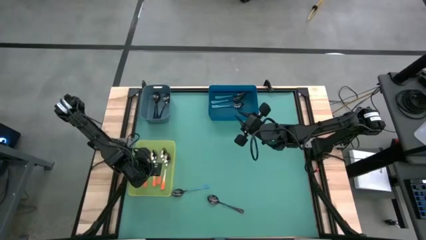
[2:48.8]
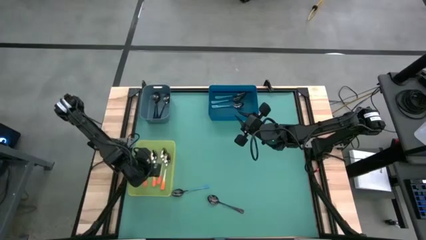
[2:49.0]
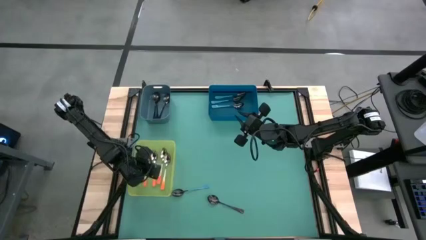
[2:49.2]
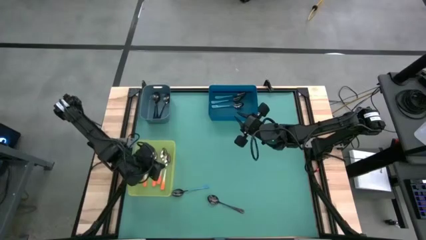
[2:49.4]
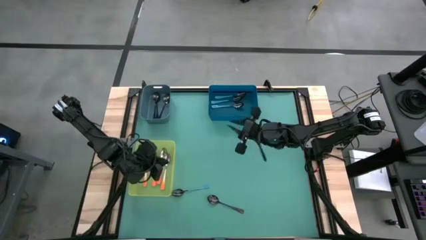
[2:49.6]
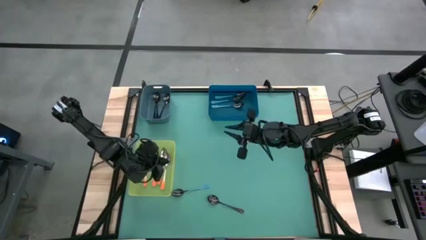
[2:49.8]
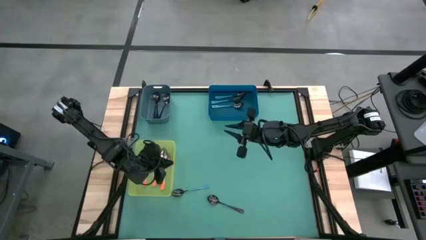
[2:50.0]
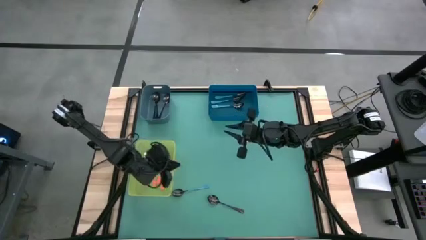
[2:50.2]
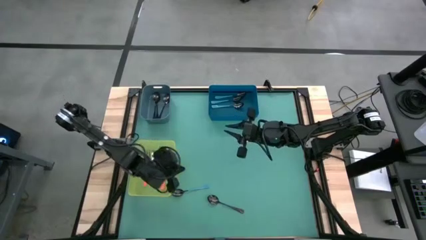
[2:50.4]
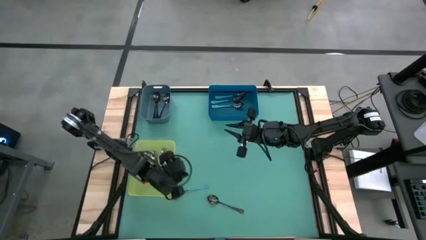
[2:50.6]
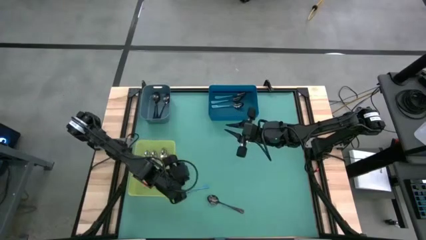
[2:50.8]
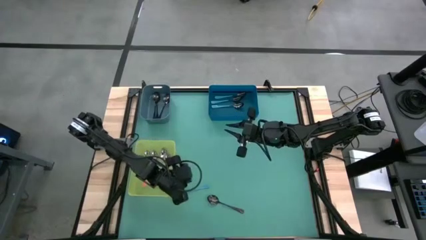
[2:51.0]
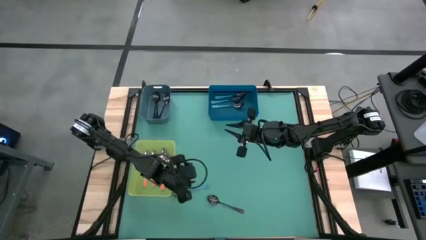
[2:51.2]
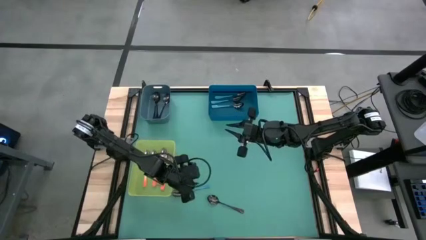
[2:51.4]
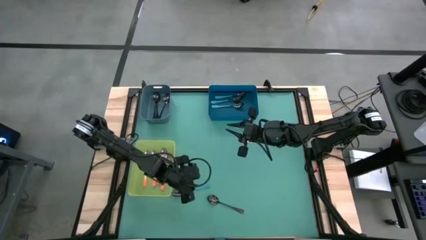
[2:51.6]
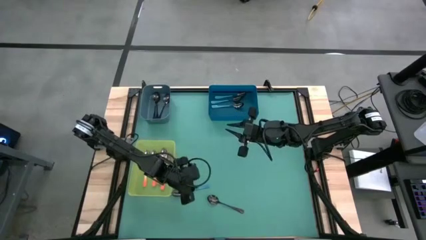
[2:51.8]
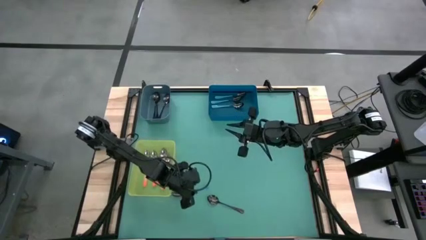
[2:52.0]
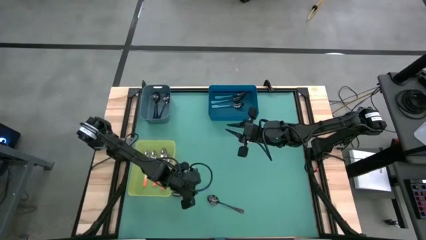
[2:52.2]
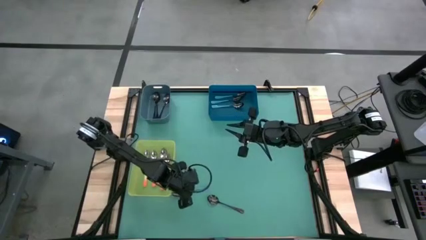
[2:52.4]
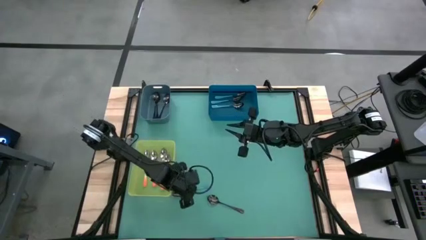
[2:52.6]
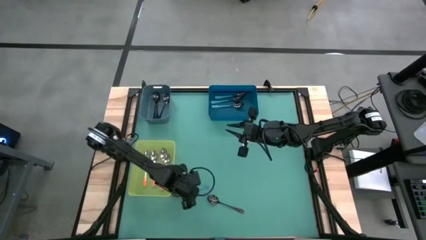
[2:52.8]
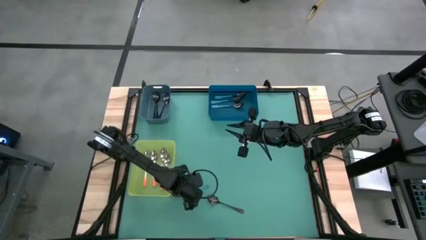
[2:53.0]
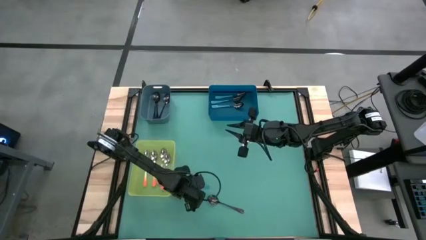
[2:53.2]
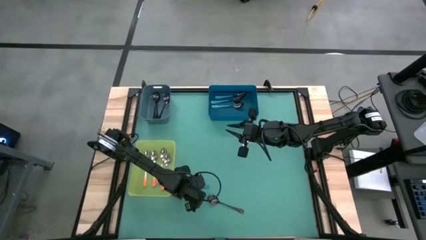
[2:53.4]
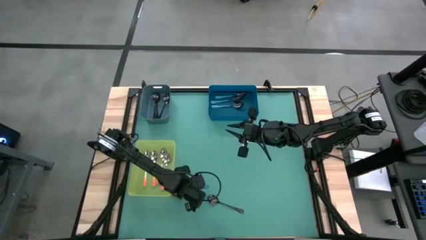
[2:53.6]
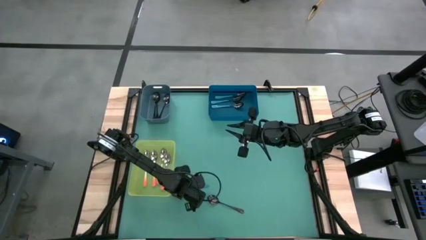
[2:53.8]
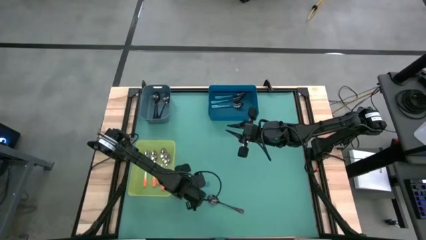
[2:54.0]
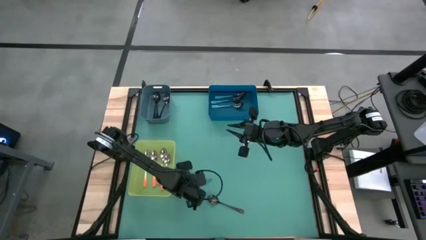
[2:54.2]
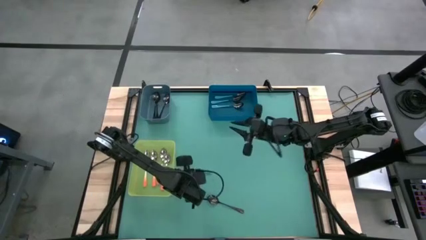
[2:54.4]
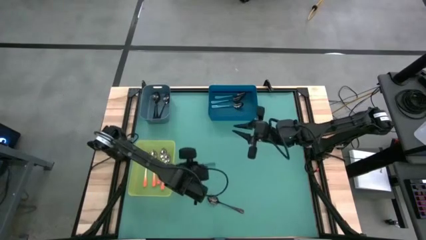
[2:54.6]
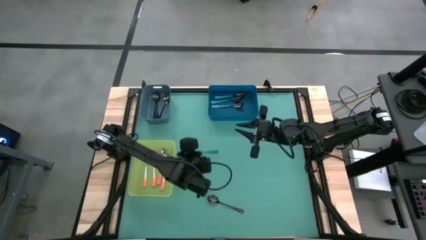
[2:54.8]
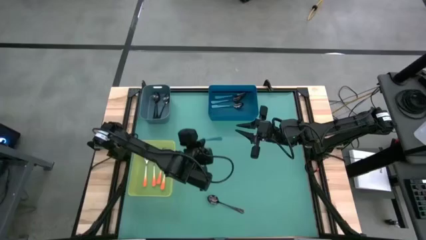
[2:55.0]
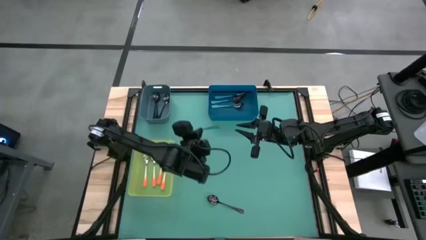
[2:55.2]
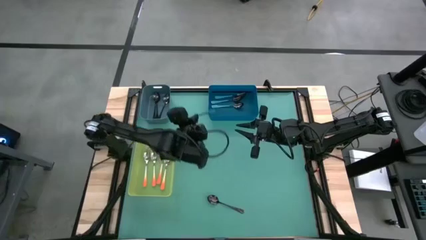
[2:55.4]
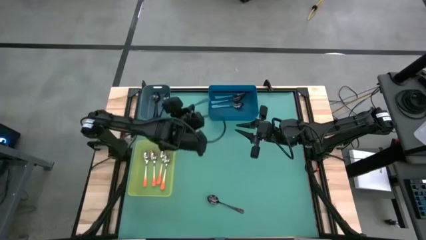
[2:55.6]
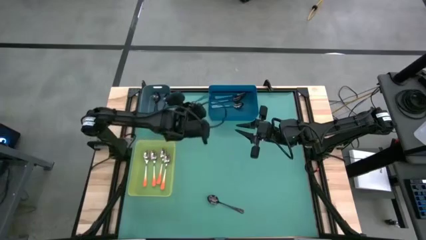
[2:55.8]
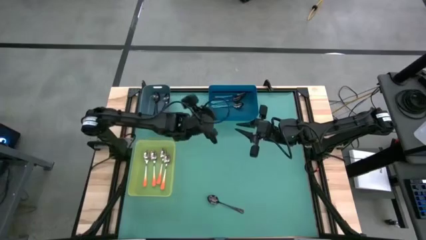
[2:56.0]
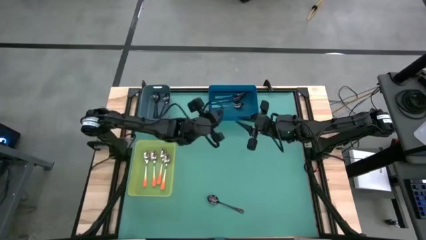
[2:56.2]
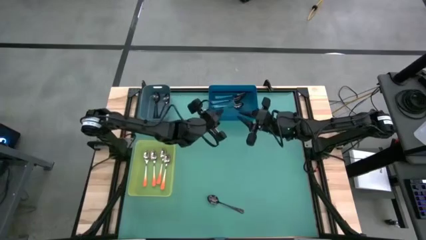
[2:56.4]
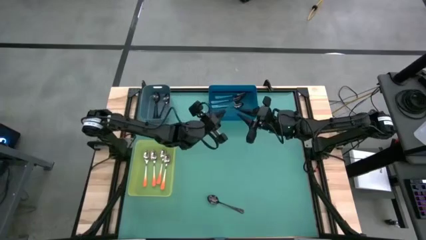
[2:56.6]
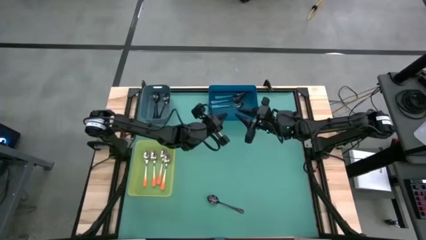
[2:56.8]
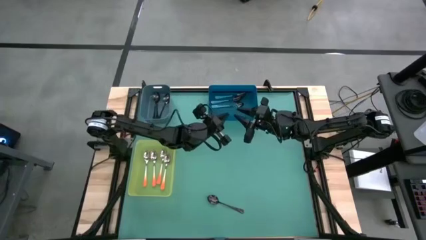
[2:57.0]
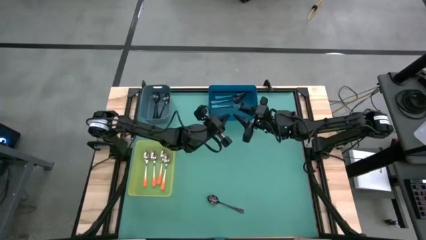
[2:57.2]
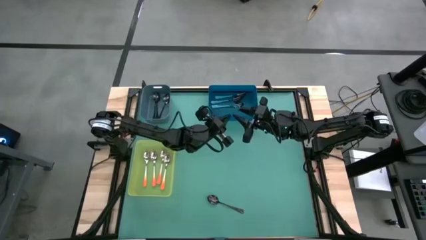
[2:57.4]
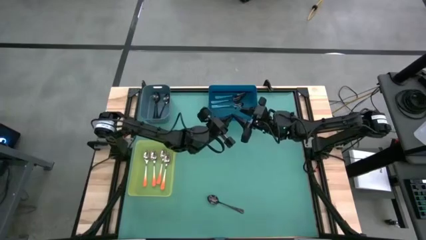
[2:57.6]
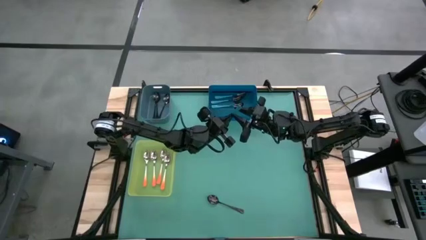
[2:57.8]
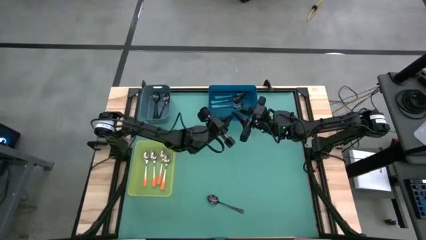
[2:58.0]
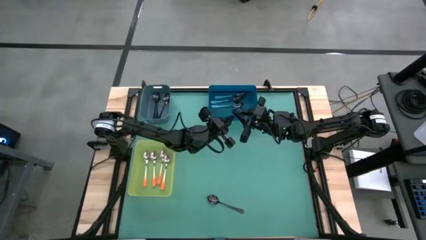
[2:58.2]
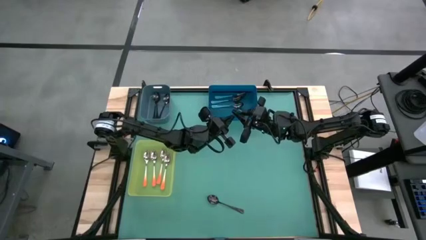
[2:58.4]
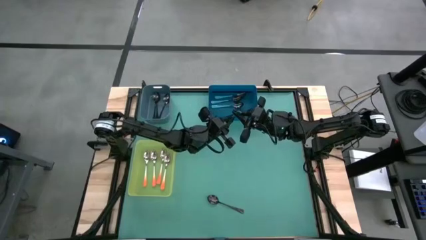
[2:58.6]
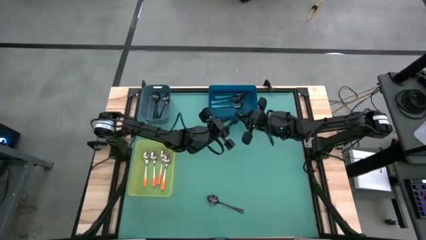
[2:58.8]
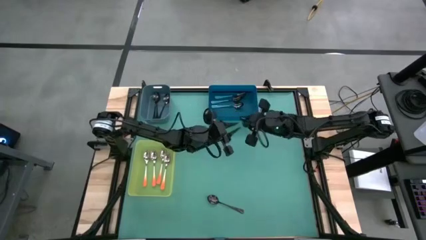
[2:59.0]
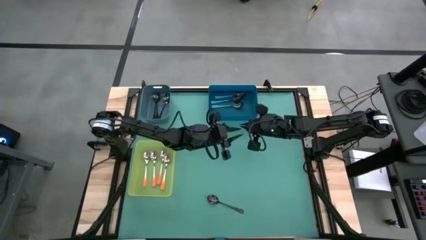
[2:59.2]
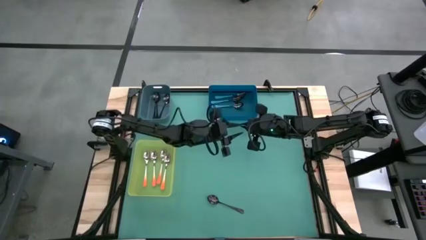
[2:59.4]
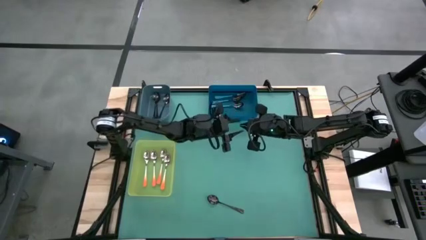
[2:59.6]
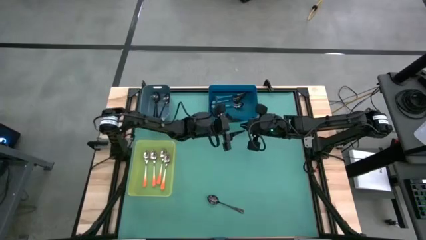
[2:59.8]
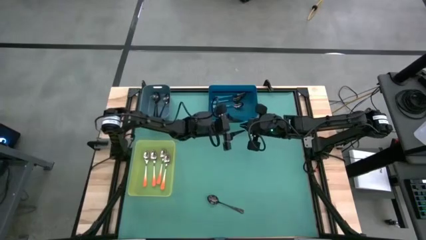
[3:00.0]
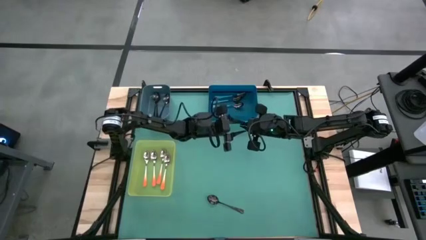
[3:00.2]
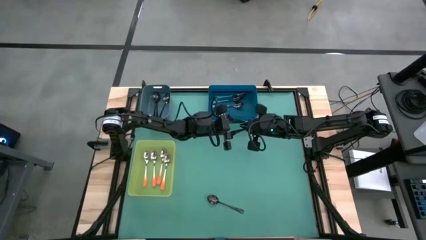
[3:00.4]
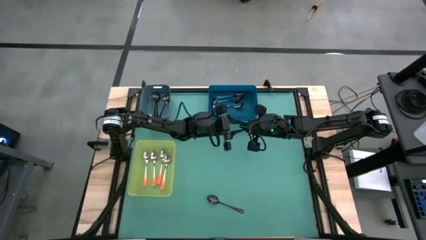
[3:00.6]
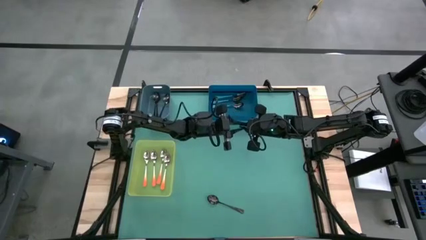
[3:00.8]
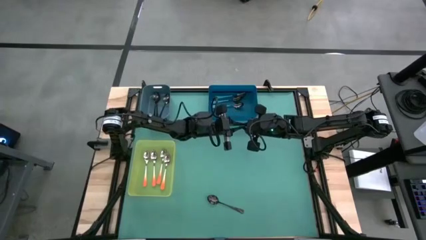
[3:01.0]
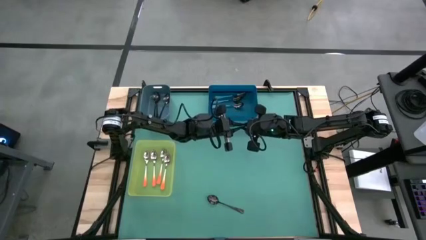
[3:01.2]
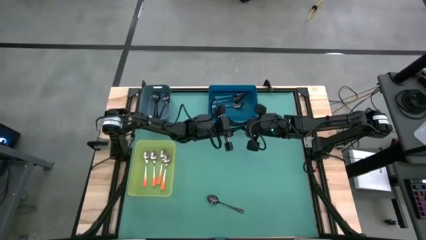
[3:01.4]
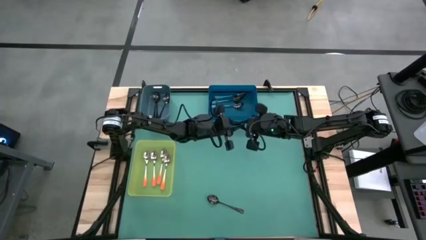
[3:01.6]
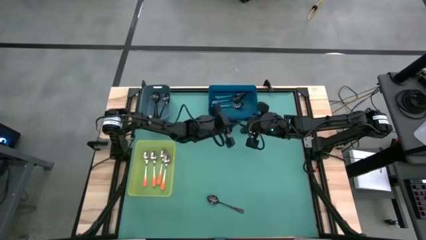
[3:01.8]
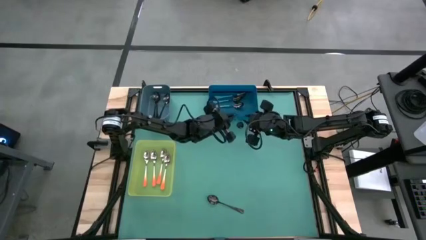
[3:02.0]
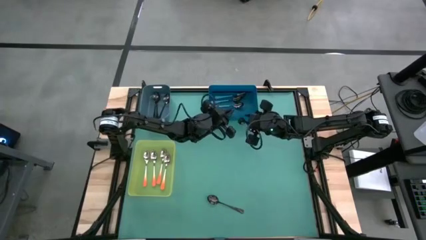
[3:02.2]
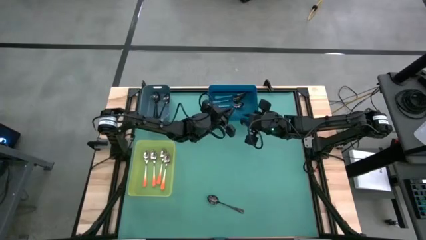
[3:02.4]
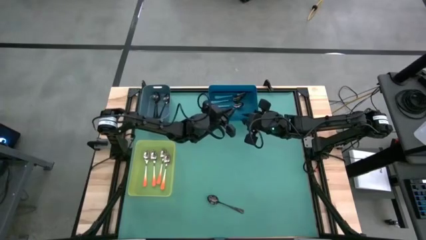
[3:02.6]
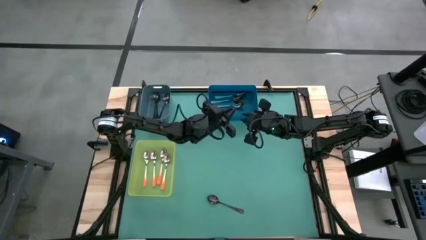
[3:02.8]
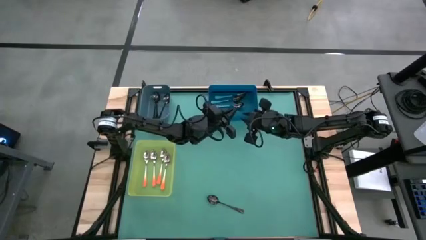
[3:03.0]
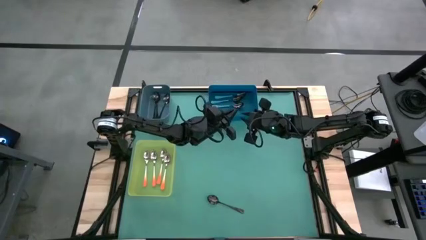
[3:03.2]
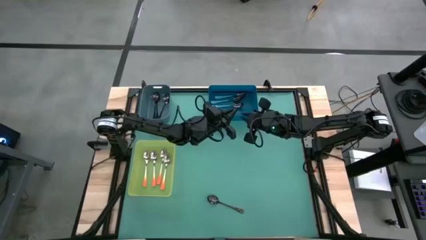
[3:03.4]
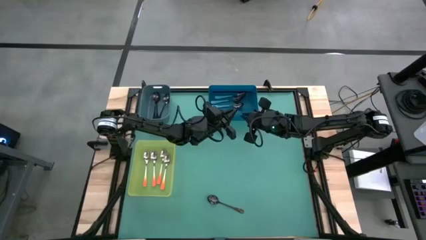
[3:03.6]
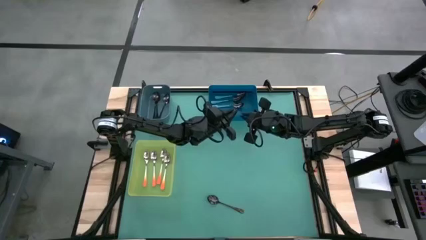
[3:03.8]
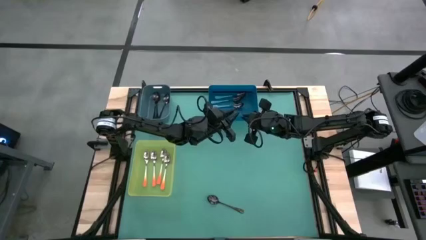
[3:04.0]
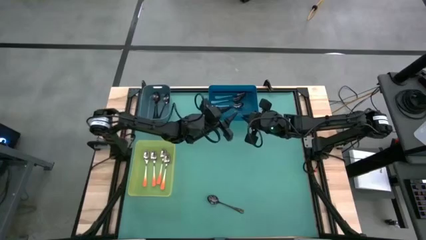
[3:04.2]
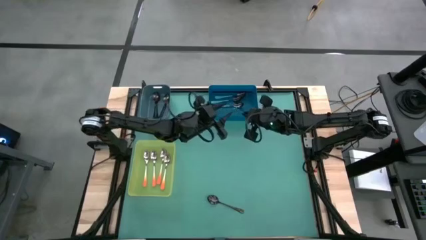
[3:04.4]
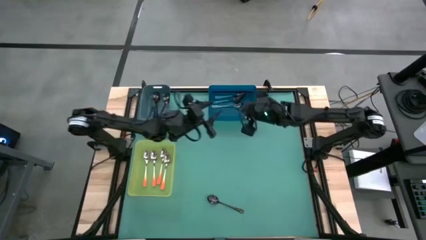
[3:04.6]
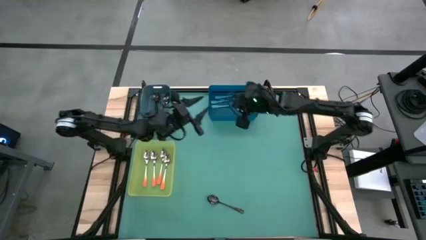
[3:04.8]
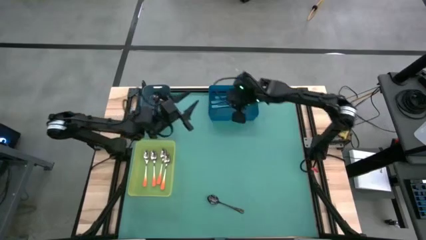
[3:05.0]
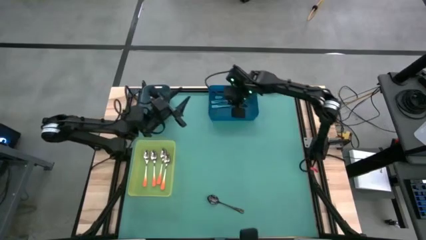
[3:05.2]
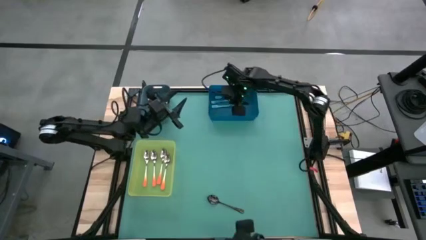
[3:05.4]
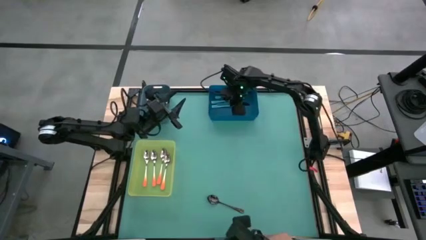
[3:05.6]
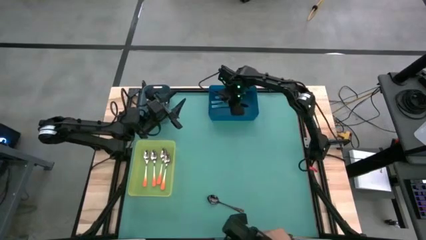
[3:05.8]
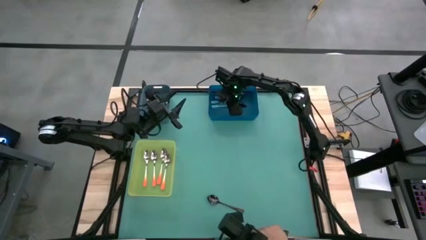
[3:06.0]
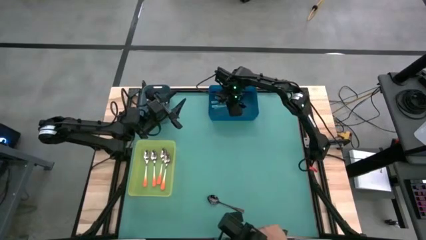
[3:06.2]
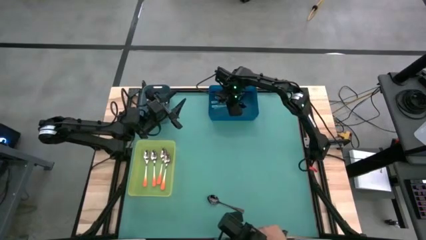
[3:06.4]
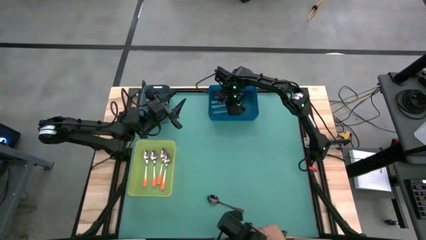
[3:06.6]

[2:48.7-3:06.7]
Task: Sort silverware by color (type)
Put the blue spoon into the dark blue bin
